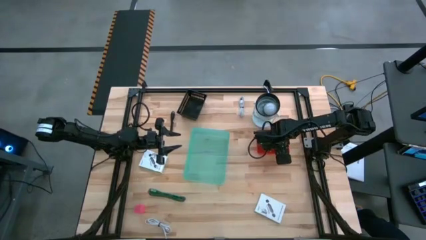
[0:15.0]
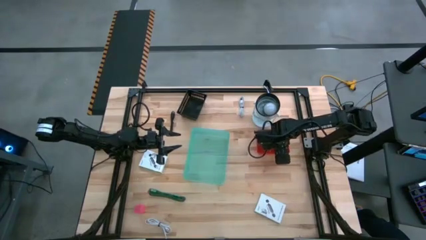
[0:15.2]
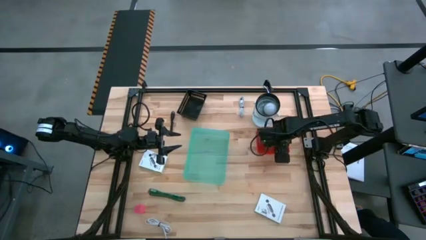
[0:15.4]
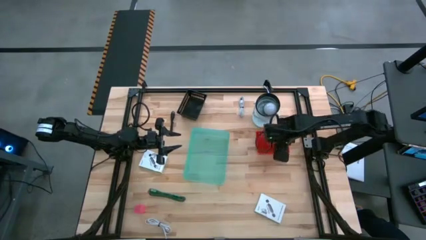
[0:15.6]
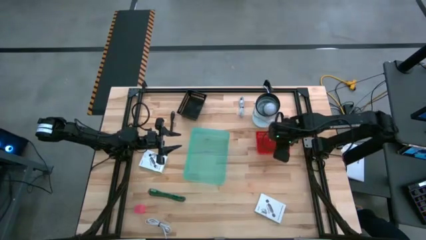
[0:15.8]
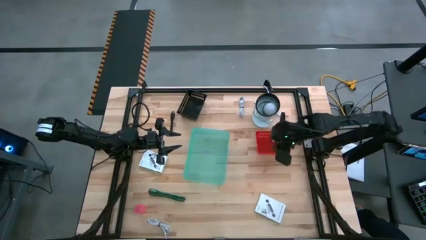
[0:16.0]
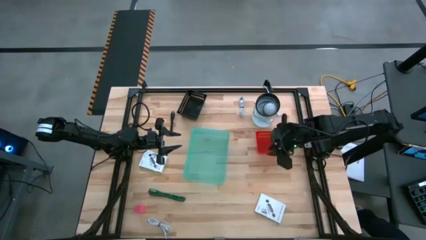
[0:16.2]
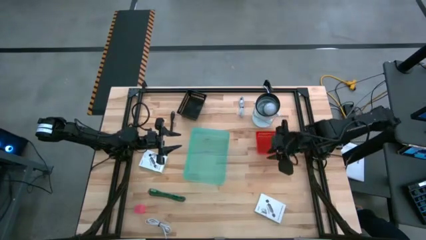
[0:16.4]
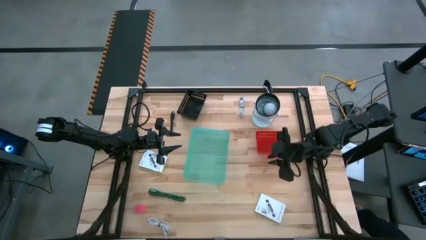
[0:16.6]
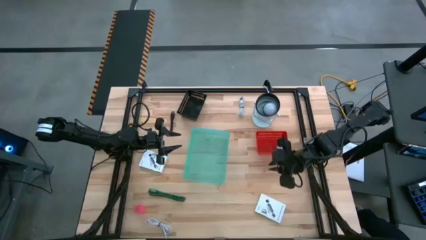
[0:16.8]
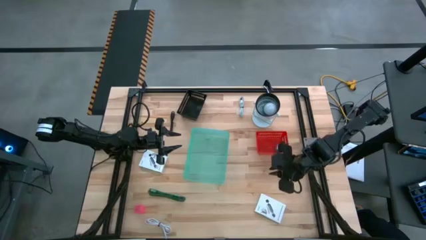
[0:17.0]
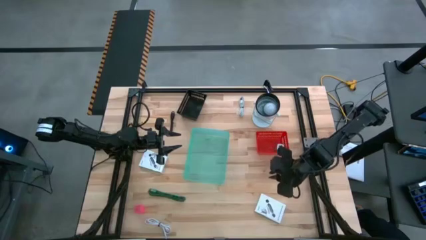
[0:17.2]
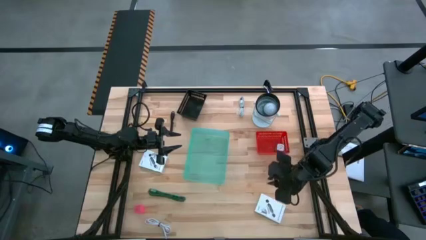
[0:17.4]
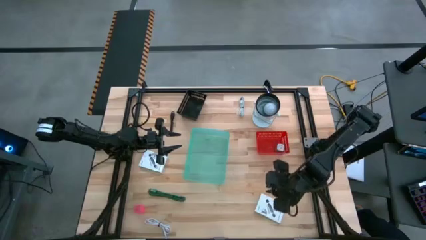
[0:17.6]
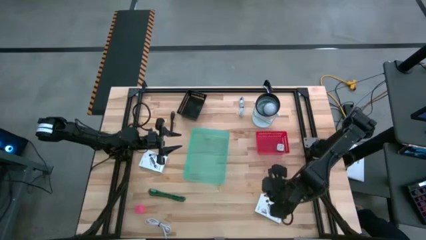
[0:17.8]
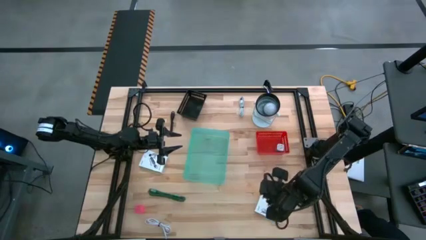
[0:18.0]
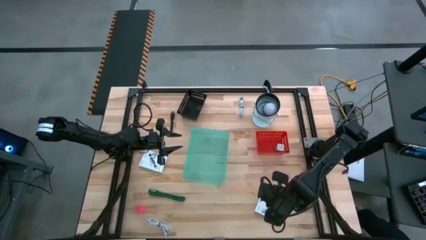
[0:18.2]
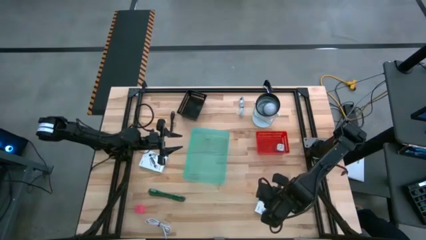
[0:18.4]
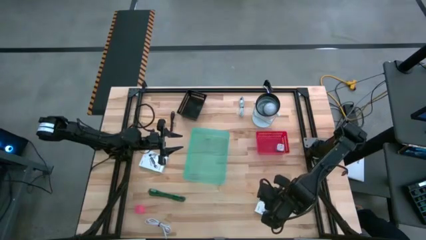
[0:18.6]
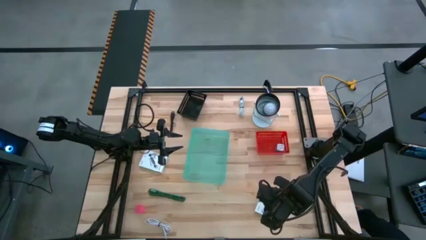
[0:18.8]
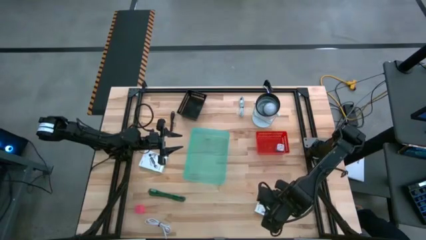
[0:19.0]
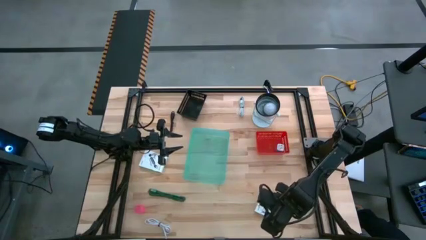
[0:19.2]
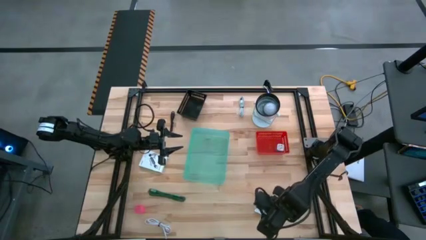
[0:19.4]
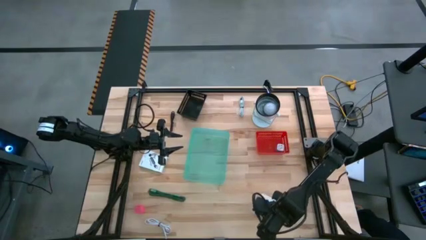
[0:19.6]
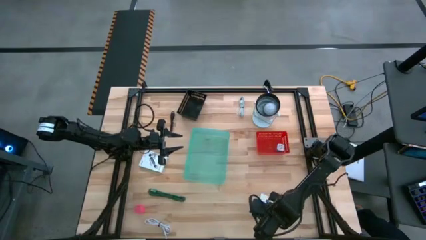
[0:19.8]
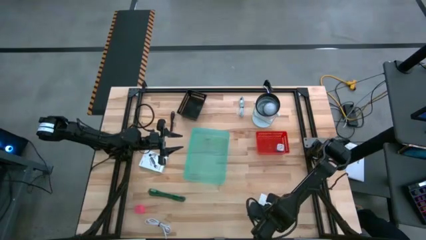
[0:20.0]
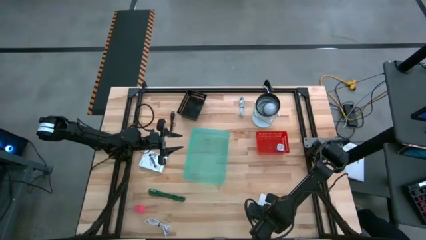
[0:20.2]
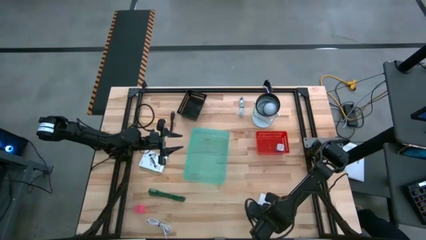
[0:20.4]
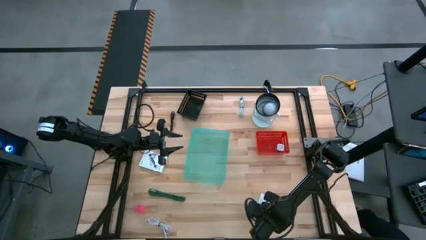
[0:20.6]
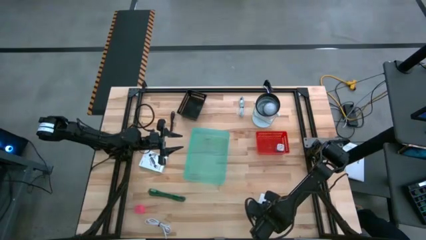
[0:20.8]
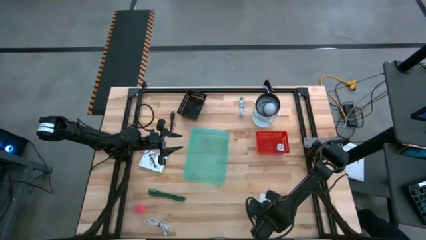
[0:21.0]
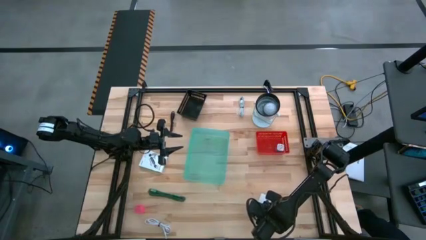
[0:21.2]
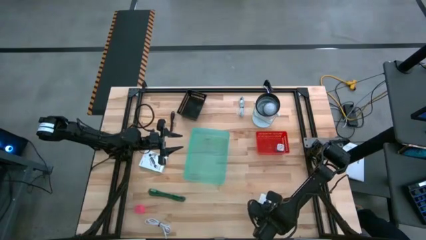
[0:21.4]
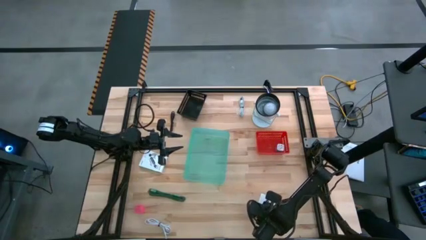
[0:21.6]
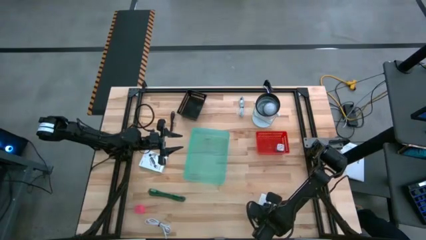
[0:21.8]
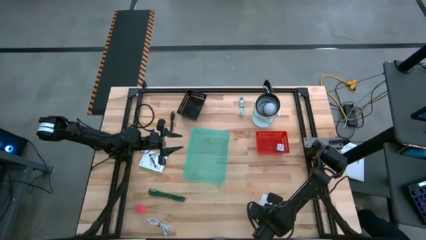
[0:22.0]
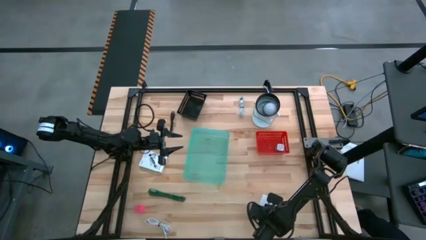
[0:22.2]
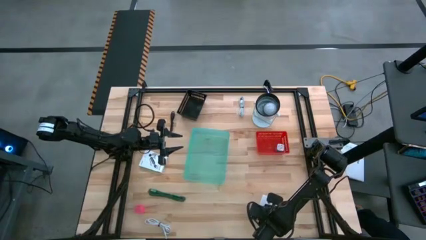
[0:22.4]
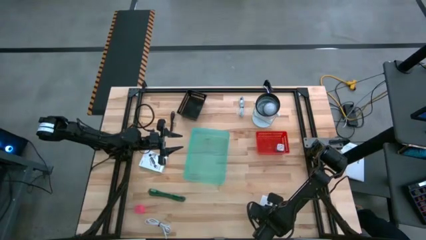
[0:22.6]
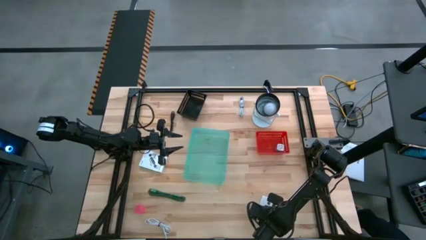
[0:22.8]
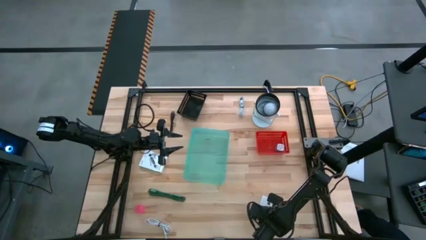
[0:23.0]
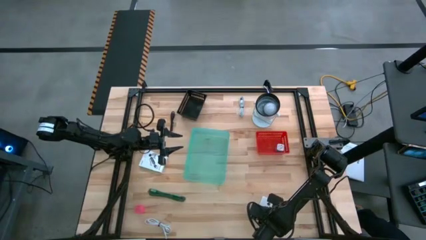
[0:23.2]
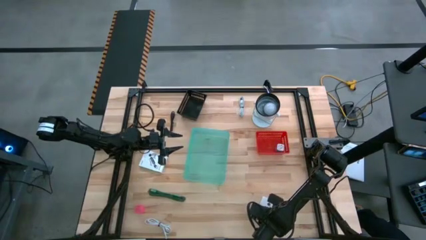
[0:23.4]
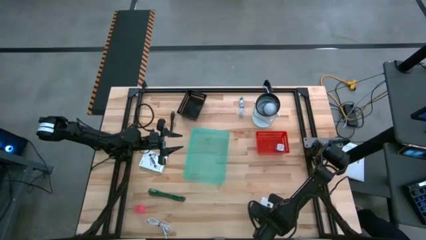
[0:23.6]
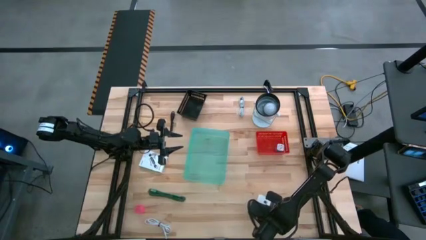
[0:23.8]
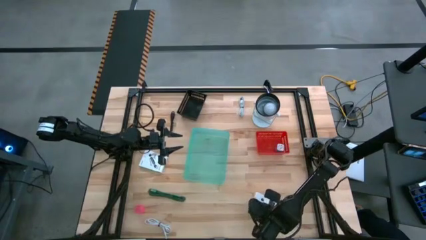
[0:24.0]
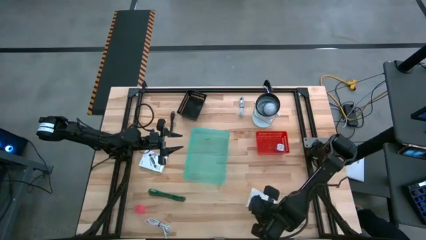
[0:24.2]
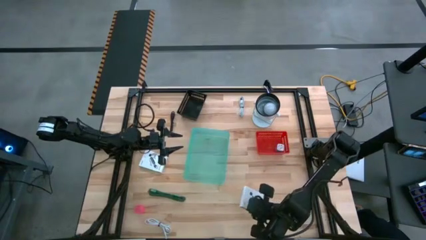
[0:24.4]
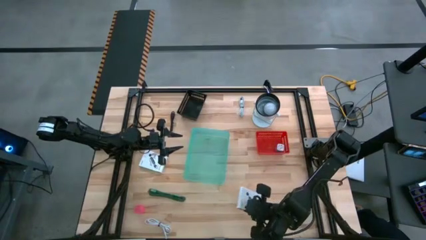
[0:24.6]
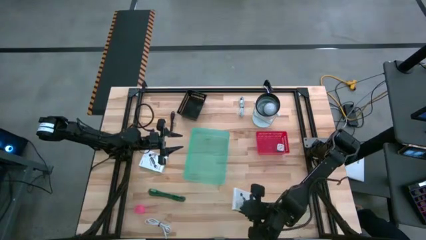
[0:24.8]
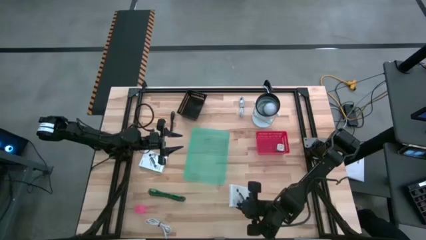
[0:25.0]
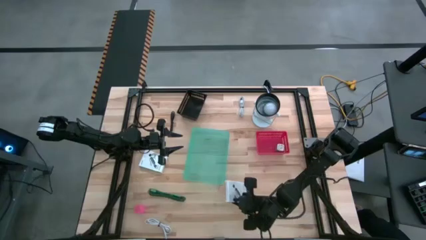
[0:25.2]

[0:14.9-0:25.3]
Task: Pick and place items into bin
Put the bottom right card reader box into the black basket
